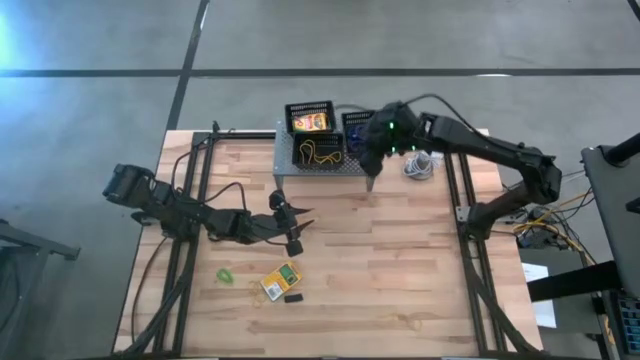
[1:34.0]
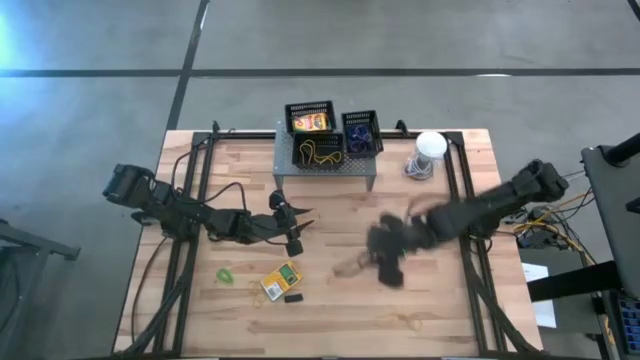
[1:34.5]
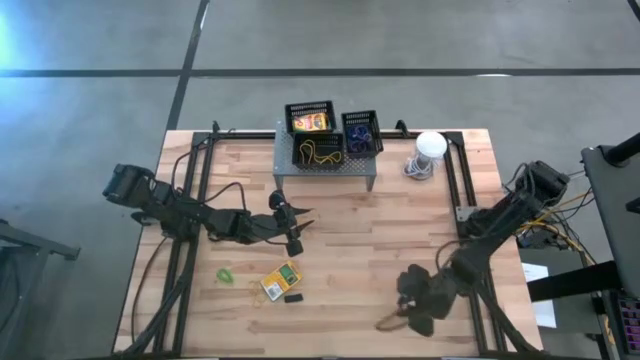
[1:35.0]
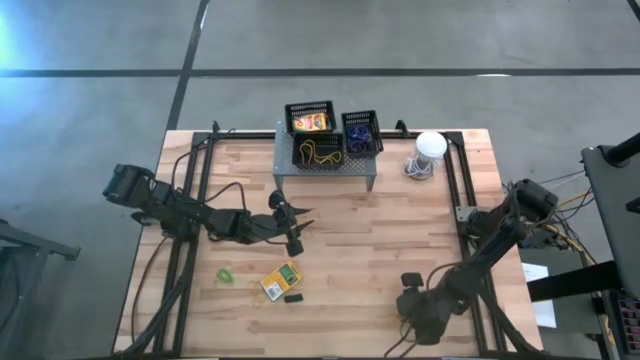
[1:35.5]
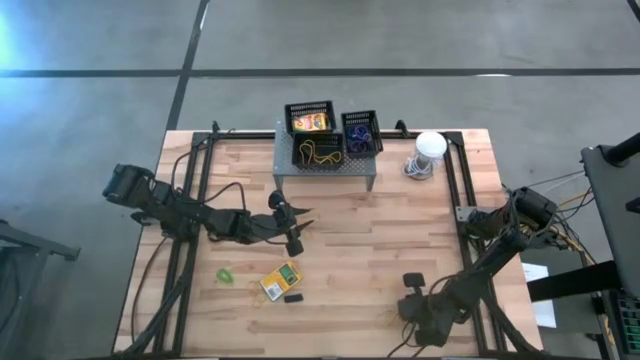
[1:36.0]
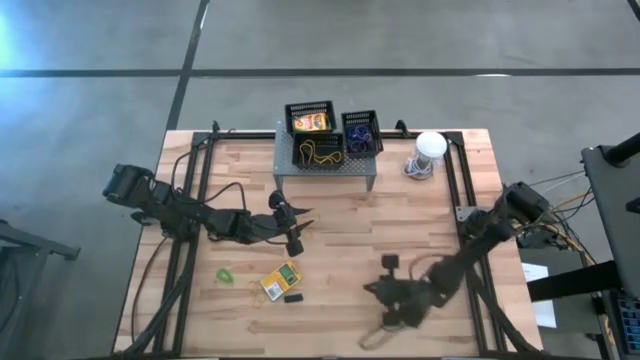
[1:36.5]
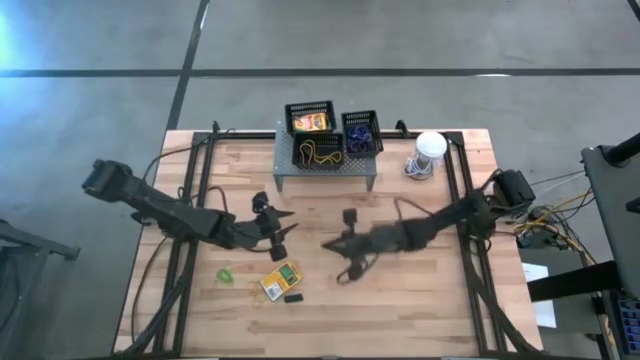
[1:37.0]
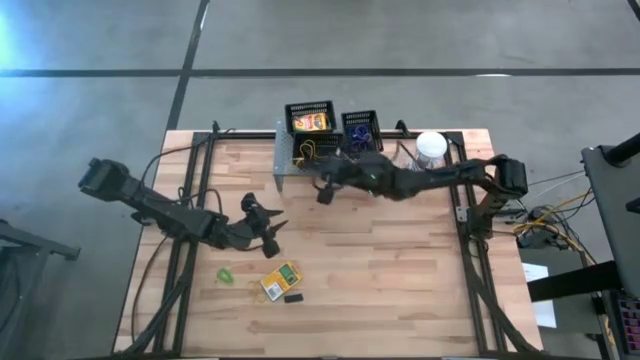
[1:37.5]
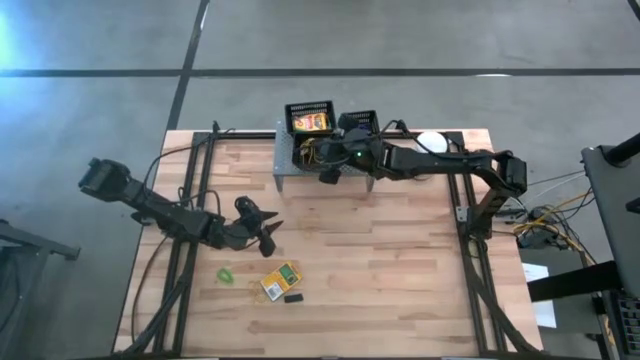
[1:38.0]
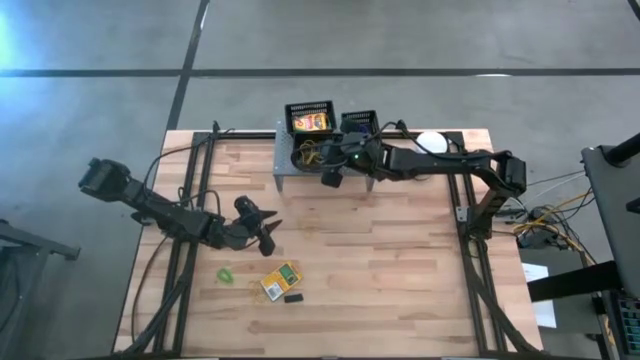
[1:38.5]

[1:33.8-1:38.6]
Task: Pick & Place Office Desk Supplies
Put the yellow rubber band into the bottom left black bin

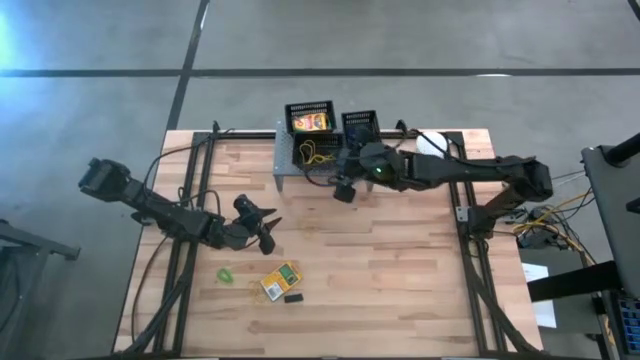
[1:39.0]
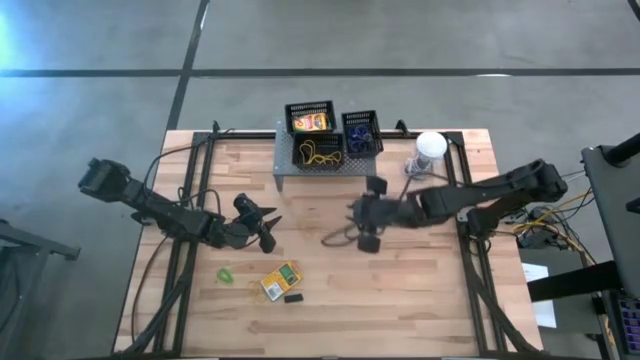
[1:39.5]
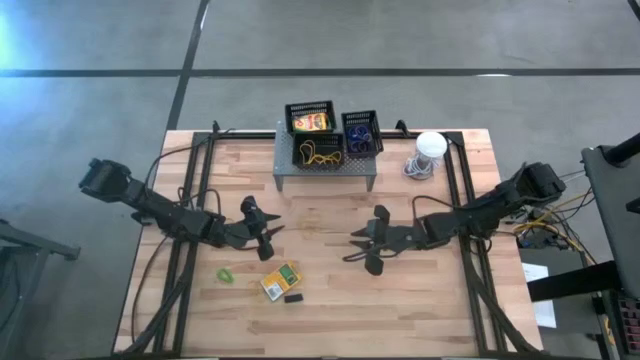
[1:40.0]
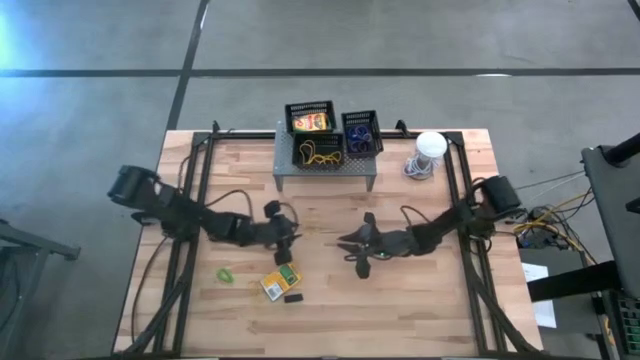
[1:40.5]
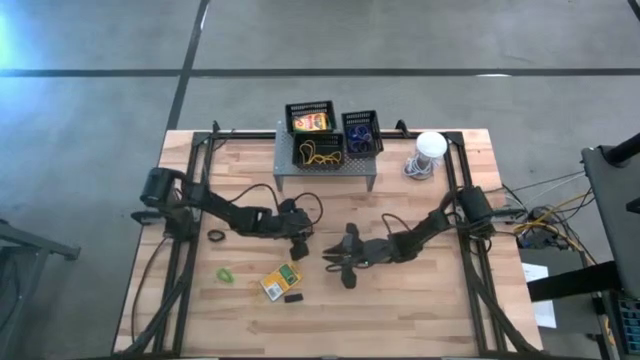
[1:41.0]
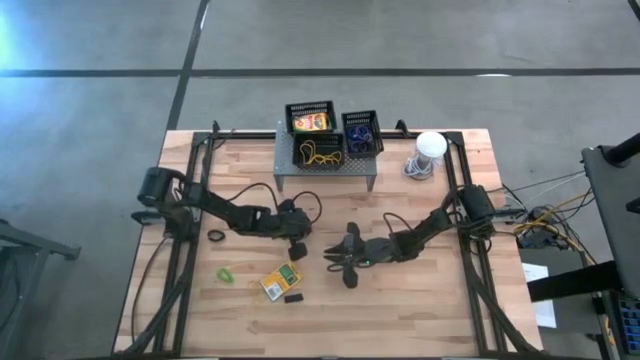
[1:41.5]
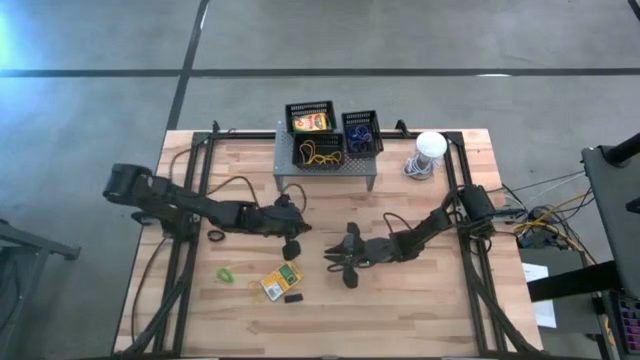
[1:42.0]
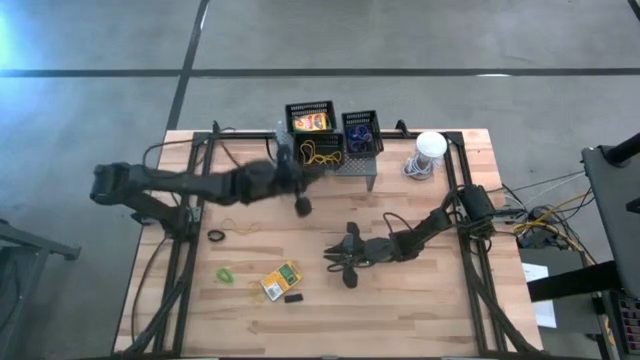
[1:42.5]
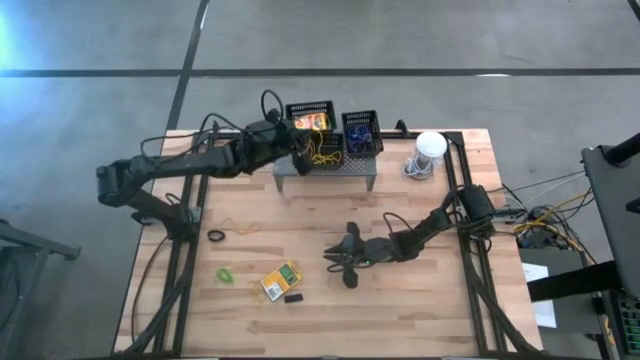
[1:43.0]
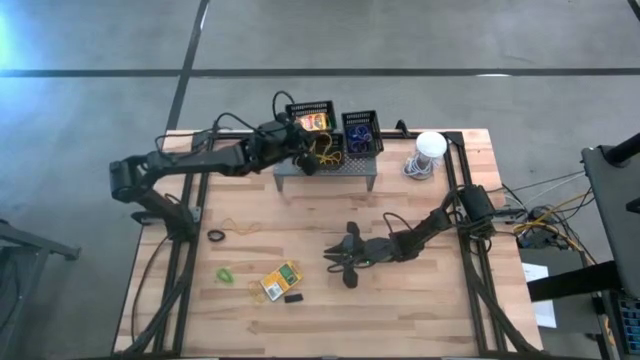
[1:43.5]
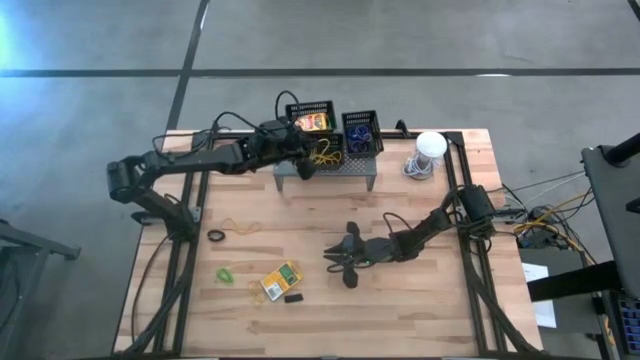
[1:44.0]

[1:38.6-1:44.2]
Put the yellow rubber band into the bottom left black bin

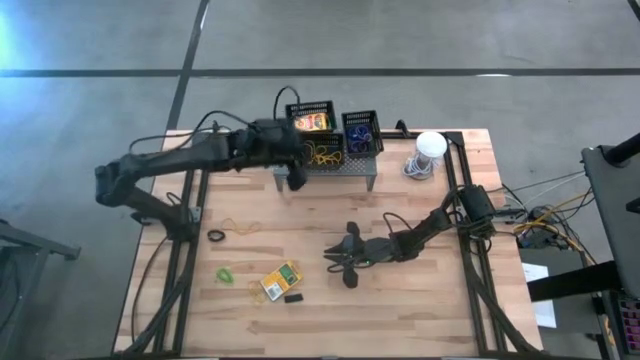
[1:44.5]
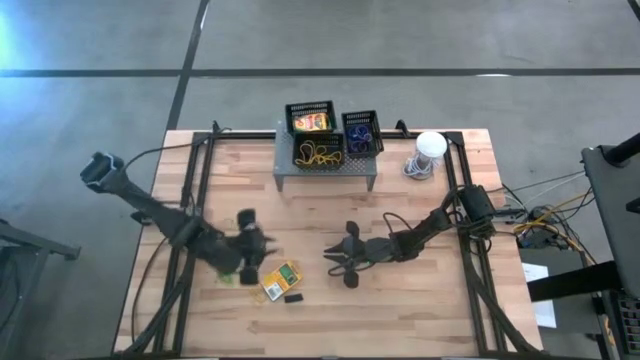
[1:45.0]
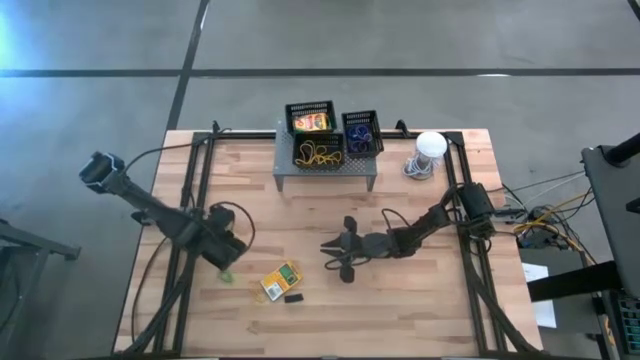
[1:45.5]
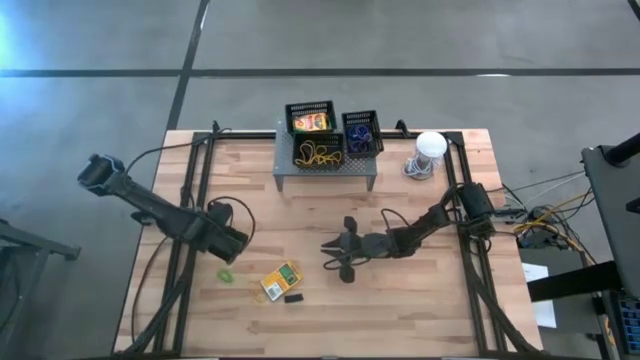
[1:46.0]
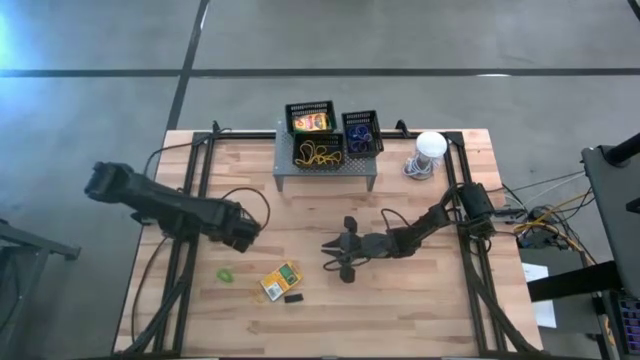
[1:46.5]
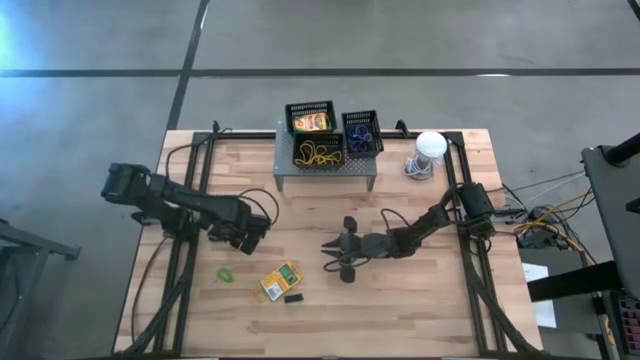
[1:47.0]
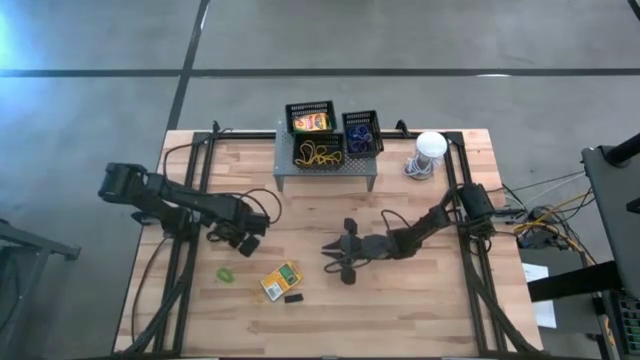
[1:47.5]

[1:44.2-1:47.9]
Put the black spring keychain into the right black bin

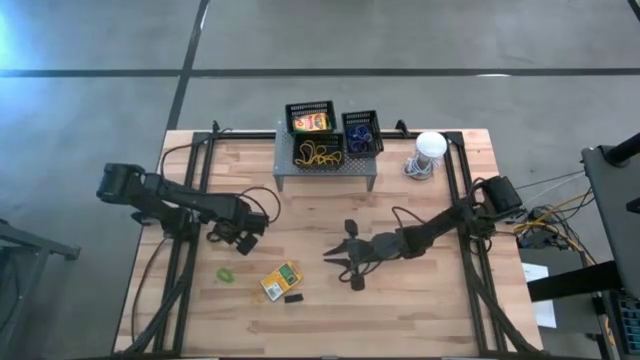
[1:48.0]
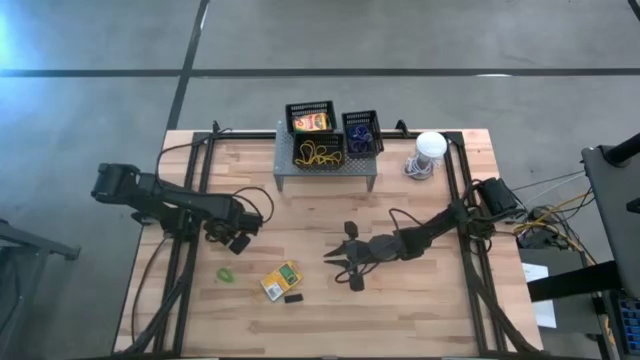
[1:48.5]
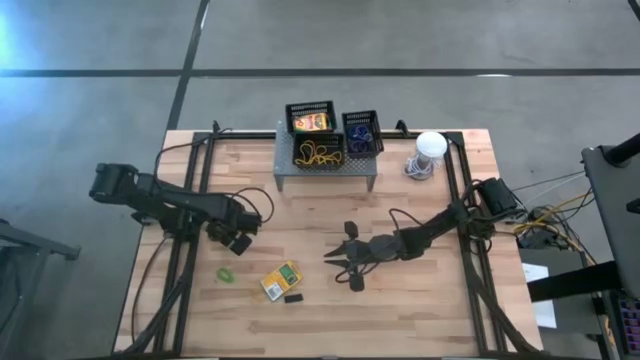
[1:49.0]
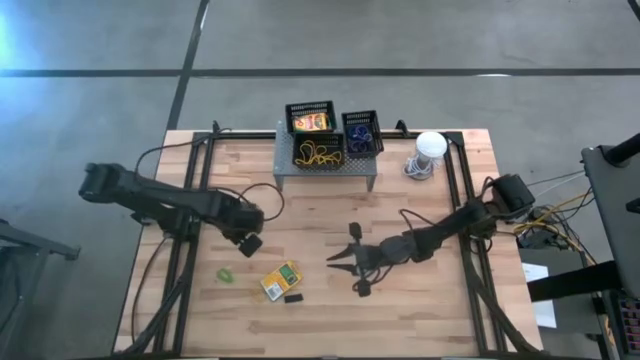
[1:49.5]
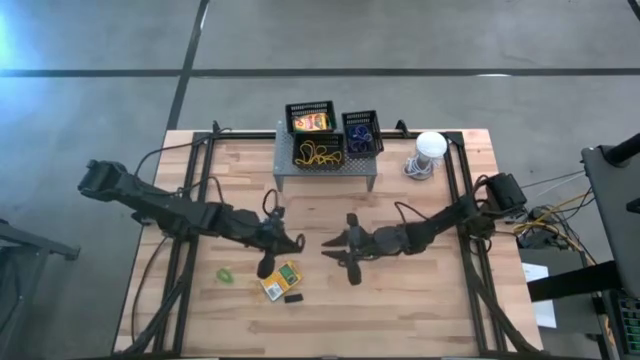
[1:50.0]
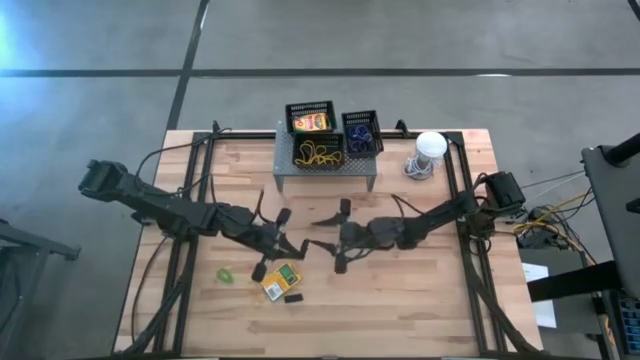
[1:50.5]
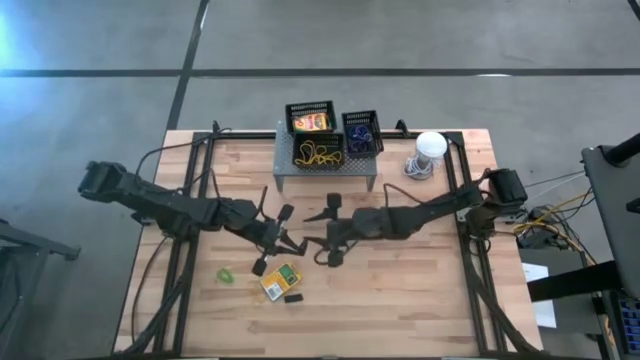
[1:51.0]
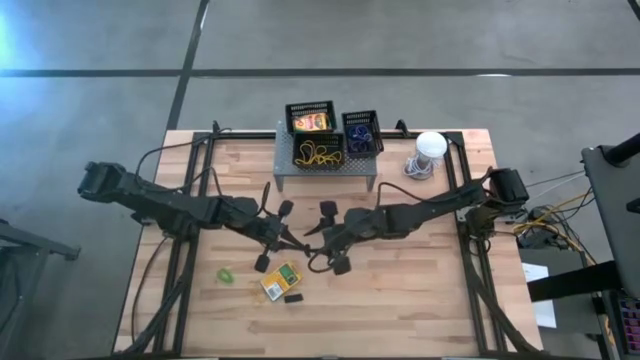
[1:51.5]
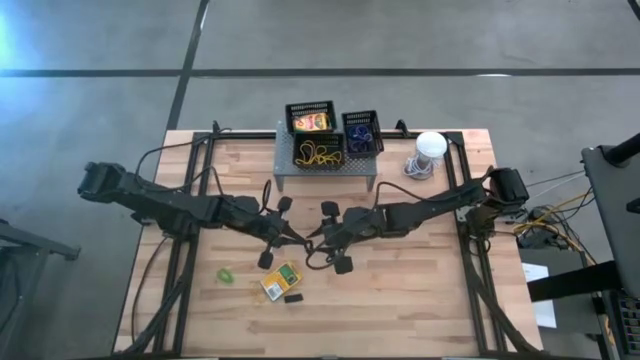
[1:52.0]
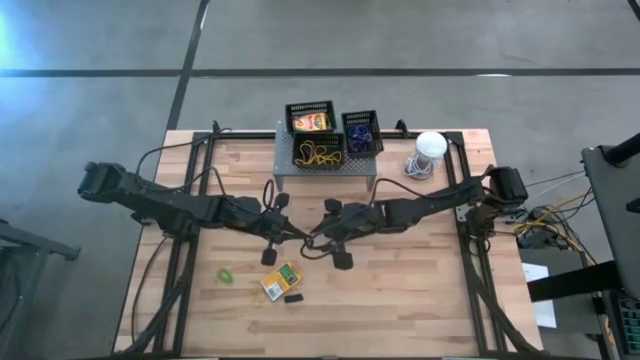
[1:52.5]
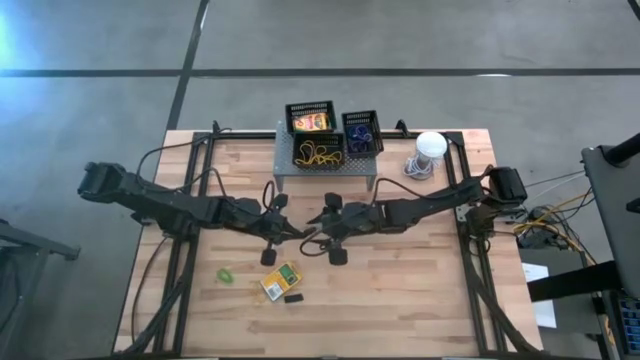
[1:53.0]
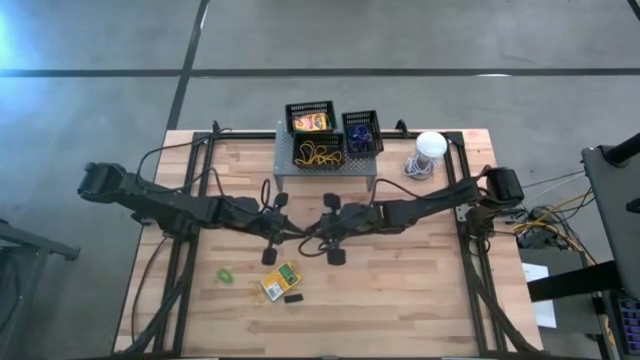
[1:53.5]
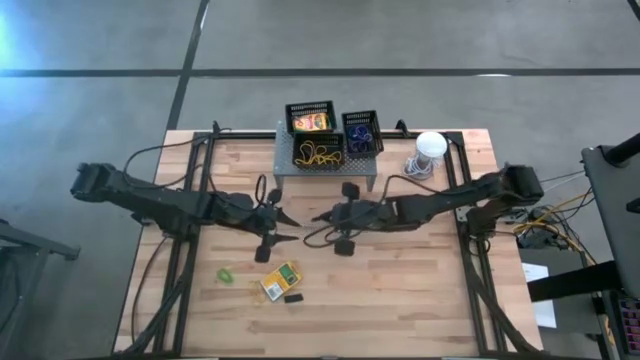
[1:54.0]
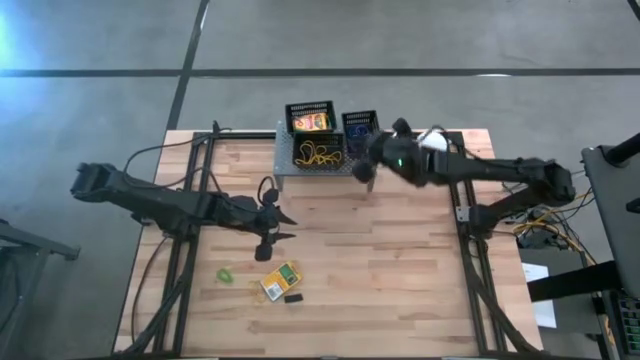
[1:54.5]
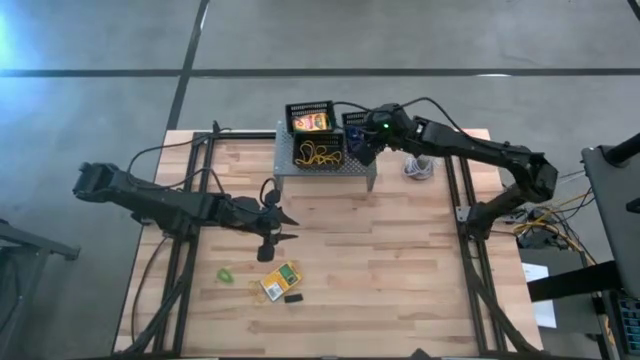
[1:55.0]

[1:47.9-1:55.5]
Put the black spring keychain into the right black bin
